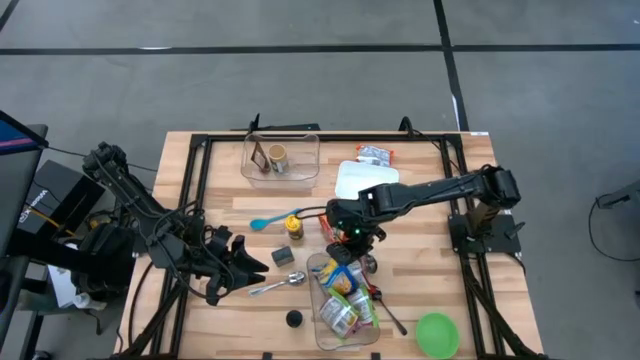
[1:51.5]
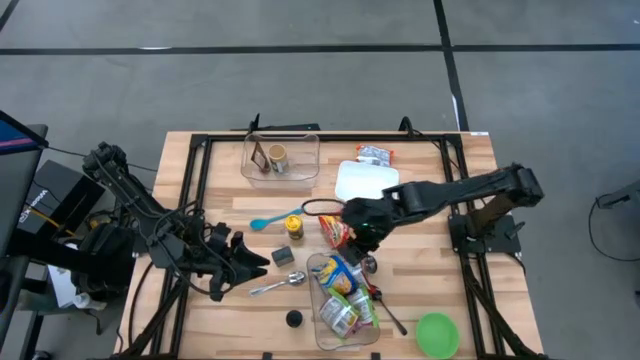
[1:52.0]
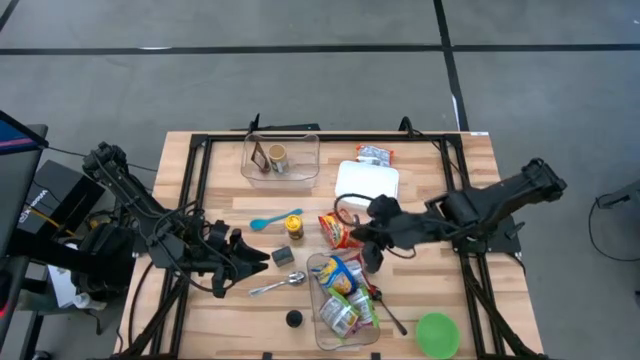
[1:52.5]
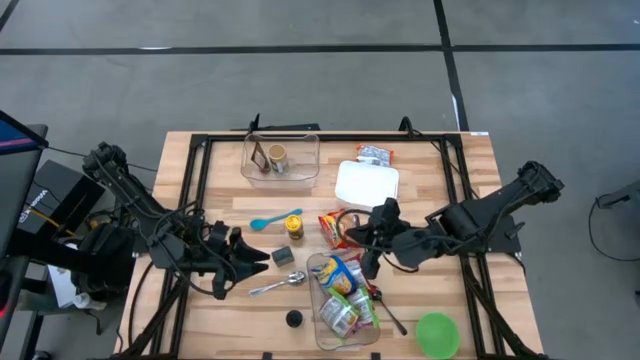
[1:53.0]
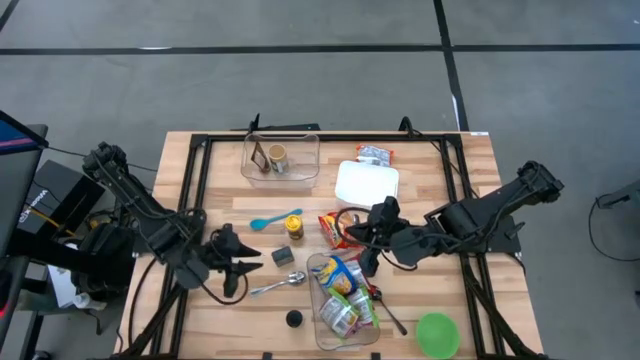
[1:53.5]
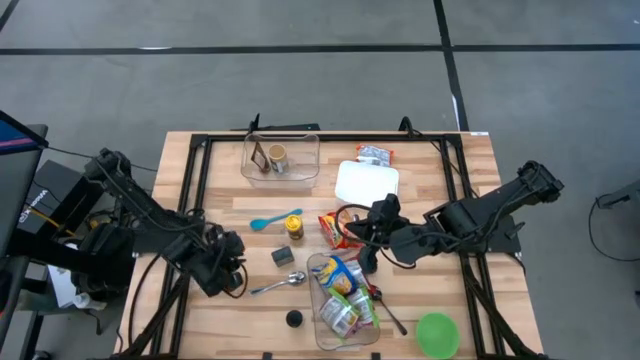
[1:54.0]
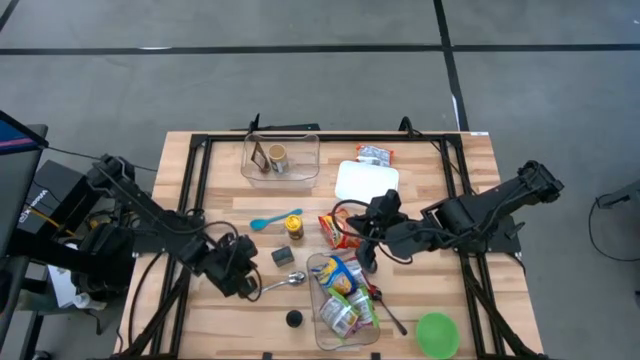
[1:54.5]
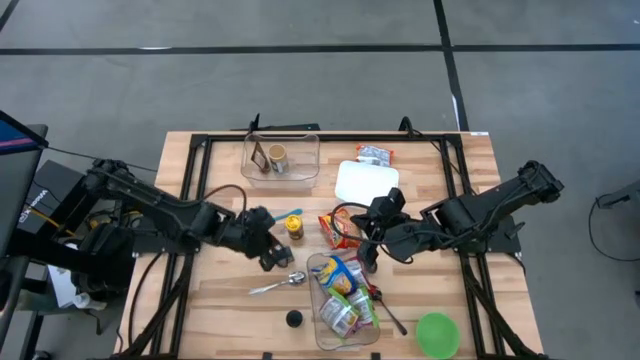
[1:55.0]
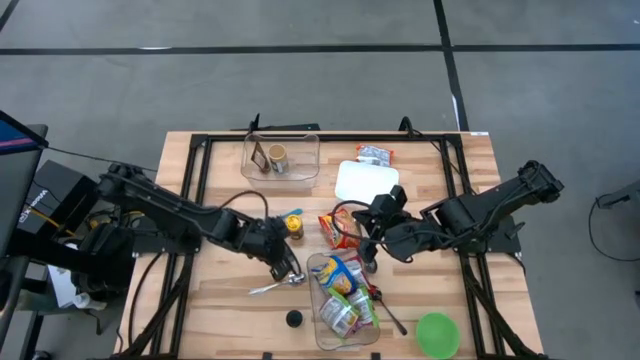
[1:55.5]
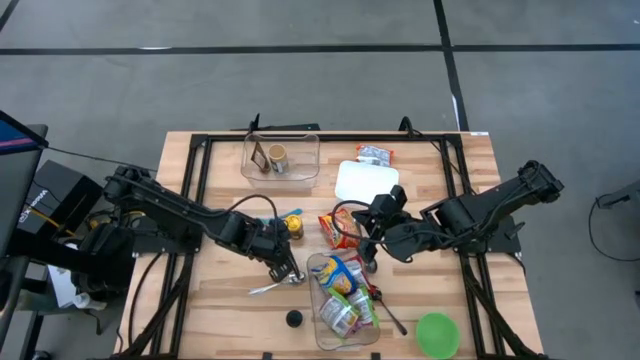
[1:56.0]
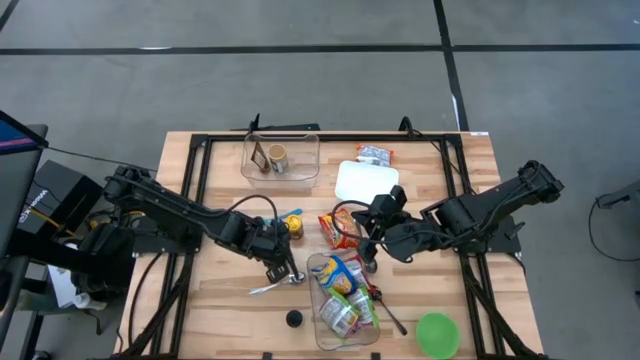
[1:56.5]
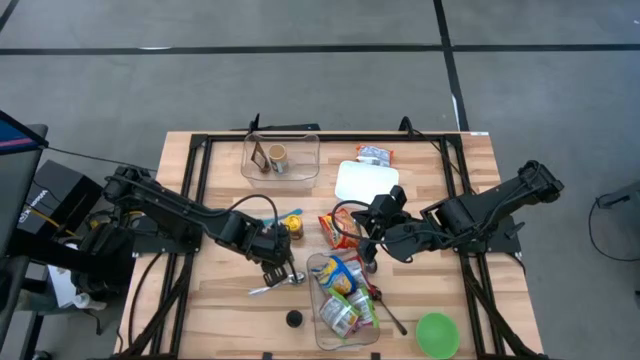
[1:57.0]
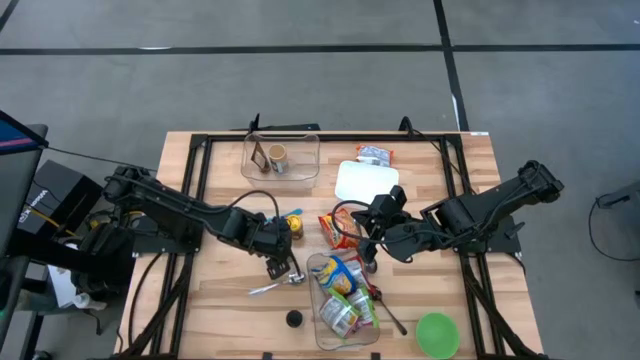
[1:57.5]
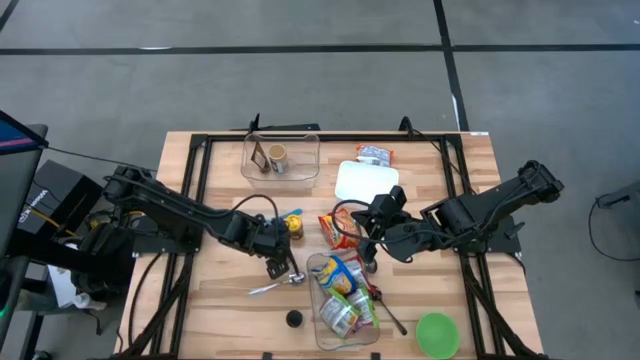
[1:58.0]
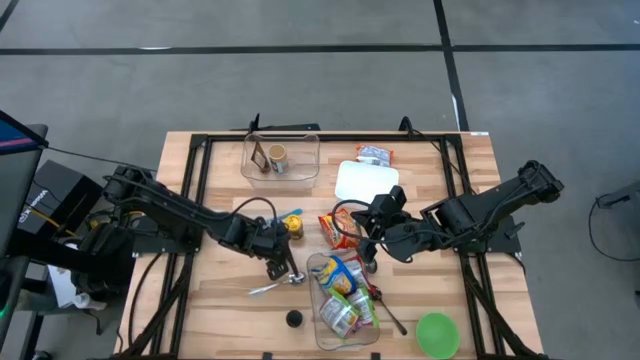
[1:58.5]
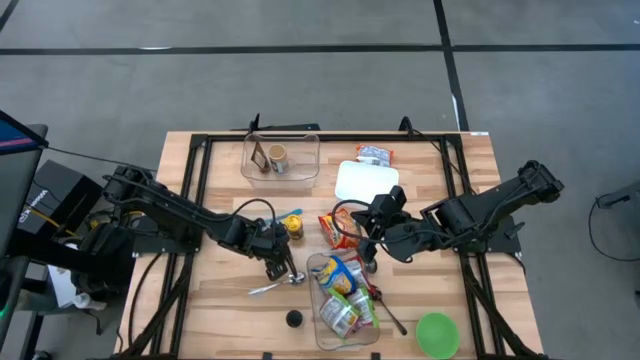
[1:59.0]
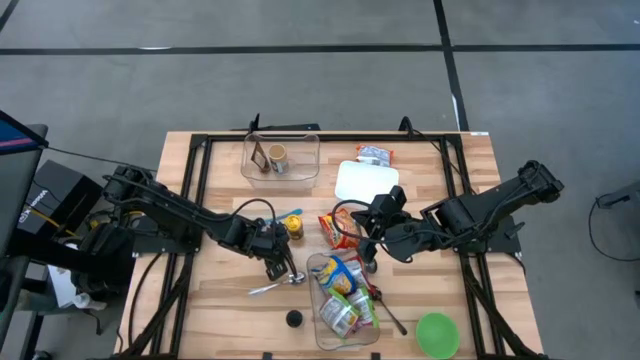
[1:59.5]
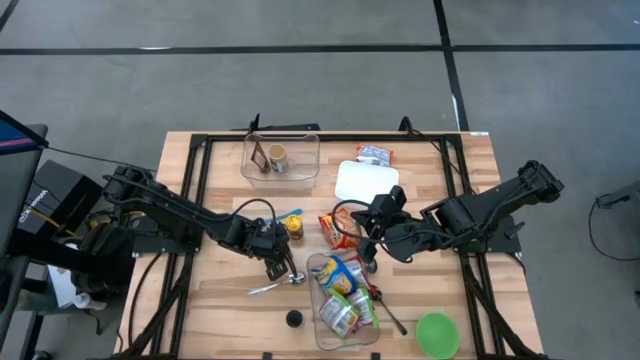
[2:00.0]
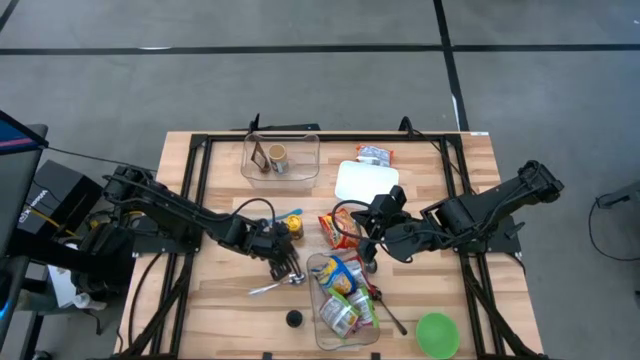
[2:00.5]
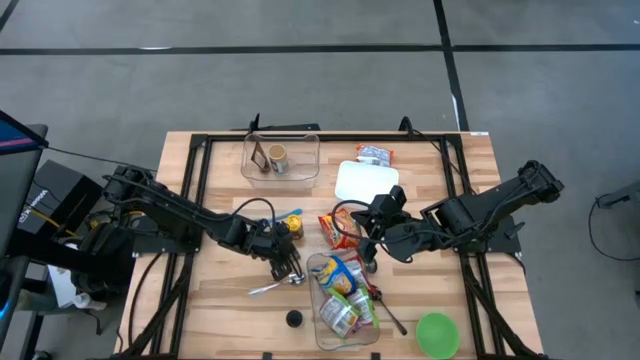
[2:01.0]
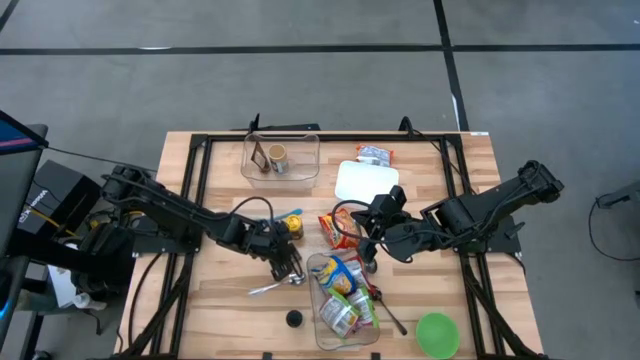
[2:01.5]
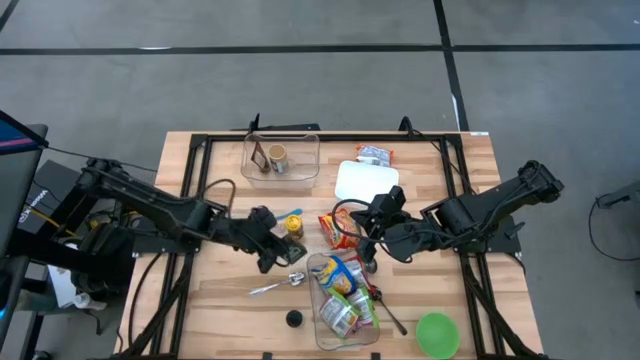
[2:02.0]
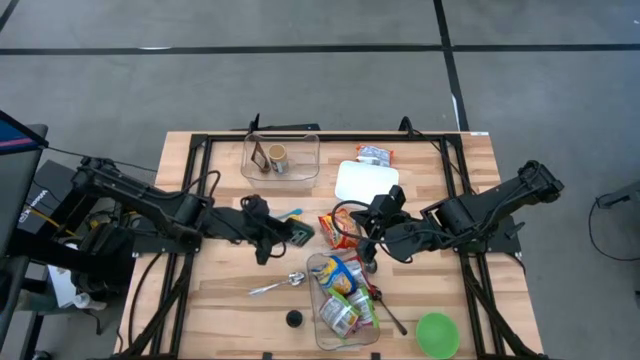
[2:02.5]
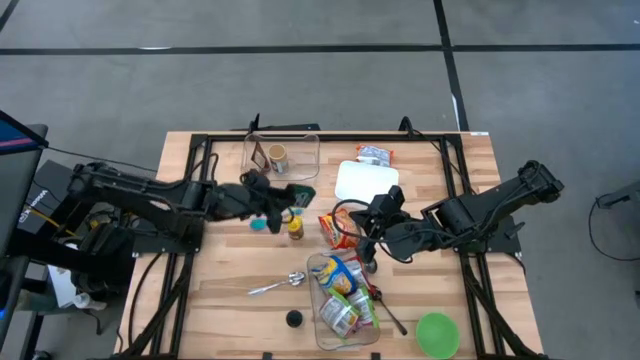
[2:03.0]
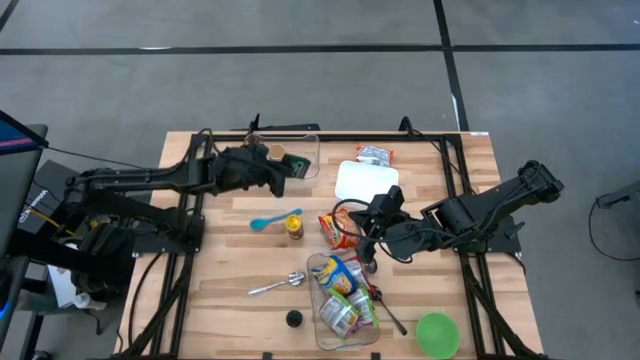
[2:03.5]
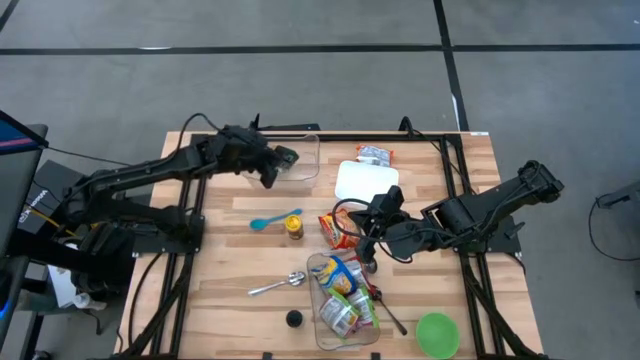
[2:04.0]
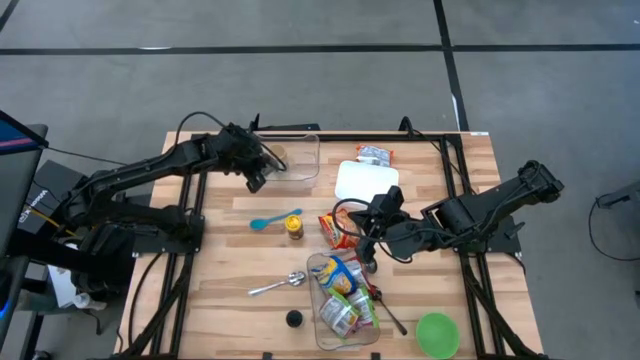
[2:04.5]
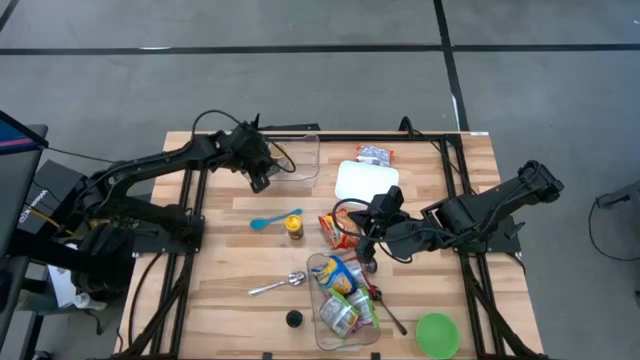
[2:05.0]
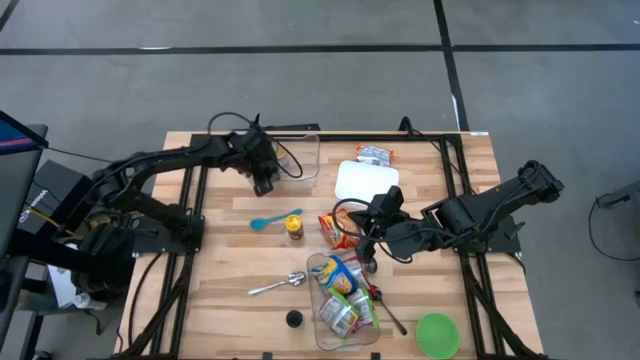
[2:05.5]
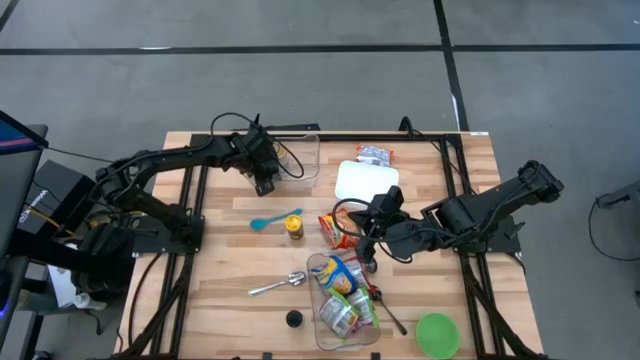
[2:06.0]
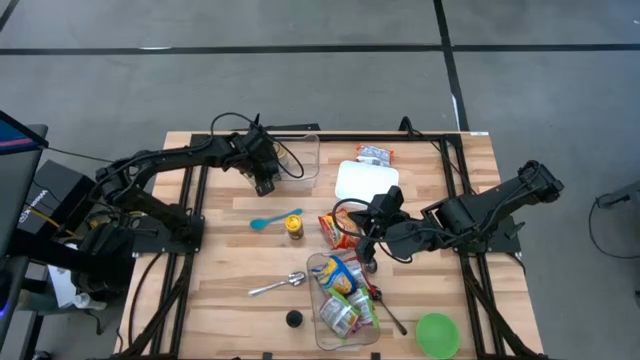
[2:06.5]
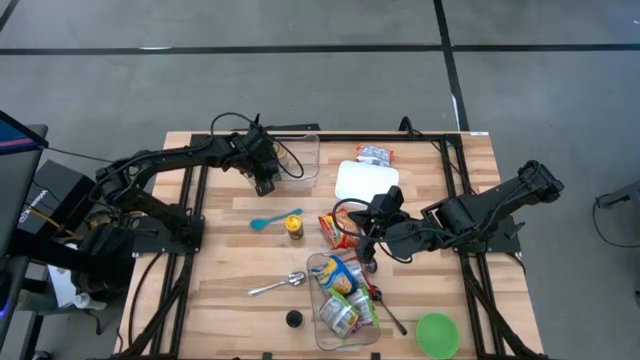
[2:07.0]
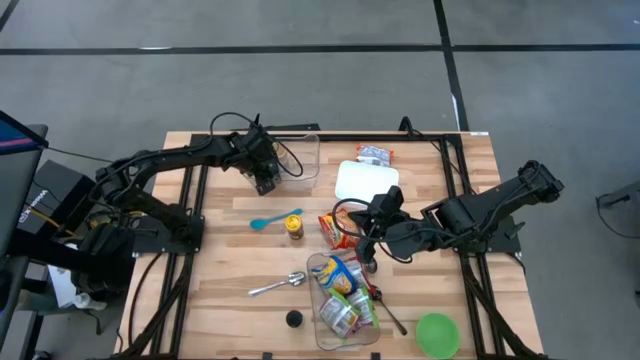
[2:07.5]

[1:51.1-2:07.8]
Task: Pick & Place Food Item
Put the green seasoning bottle into the top transparent bin

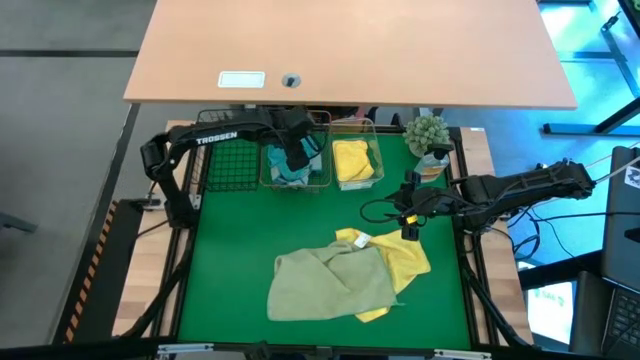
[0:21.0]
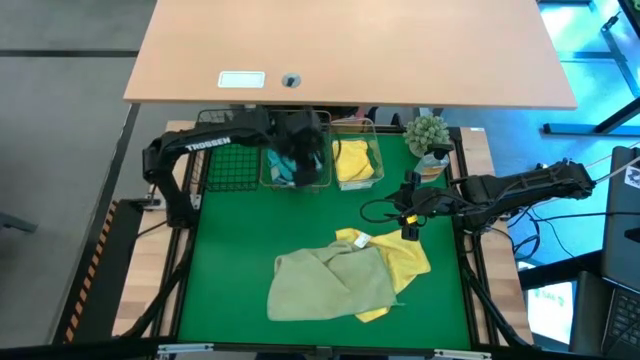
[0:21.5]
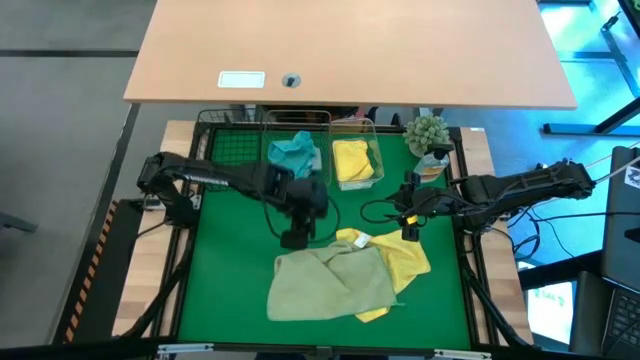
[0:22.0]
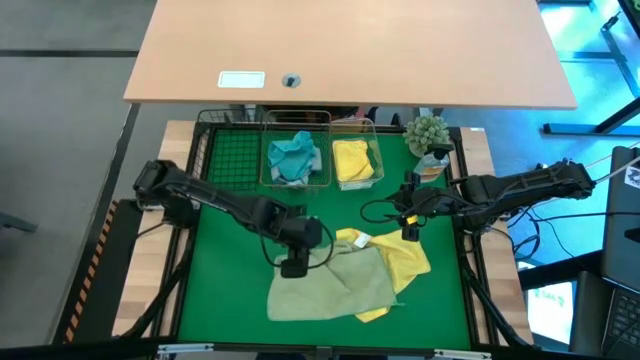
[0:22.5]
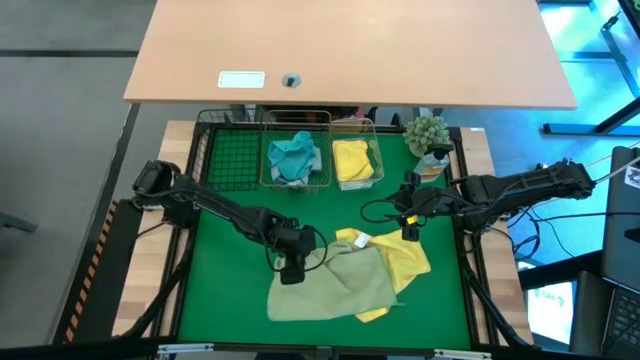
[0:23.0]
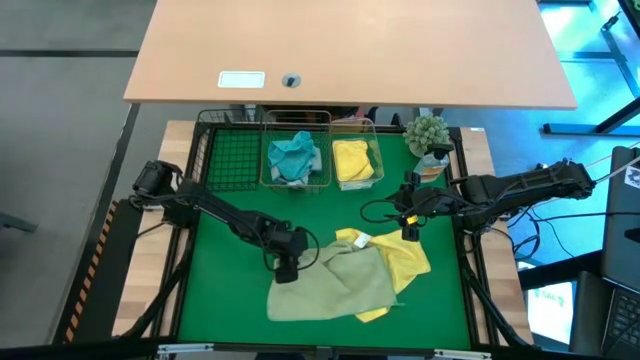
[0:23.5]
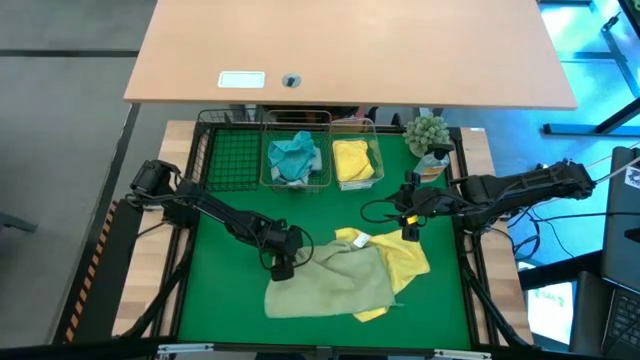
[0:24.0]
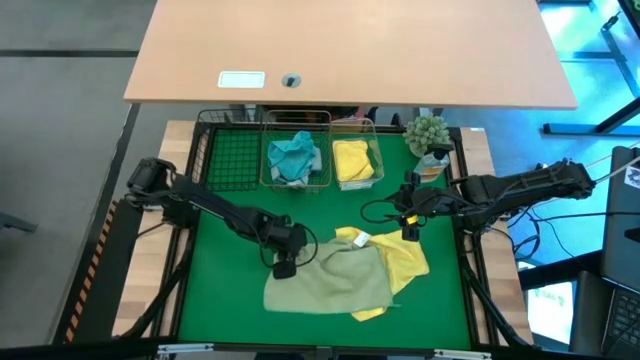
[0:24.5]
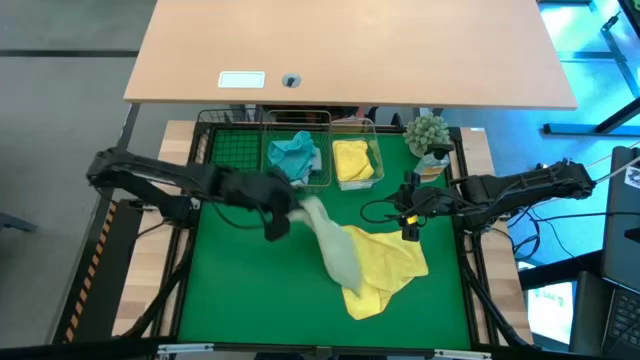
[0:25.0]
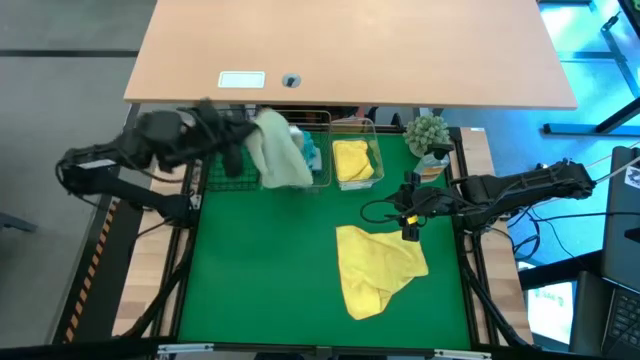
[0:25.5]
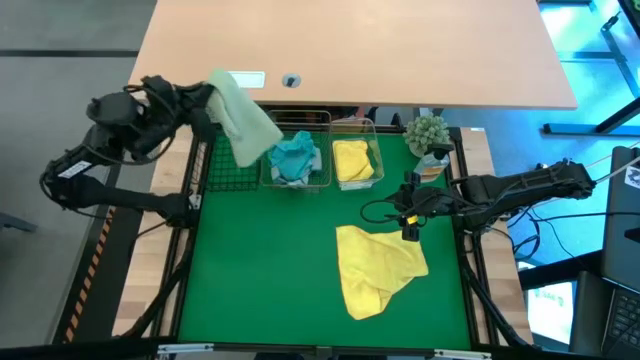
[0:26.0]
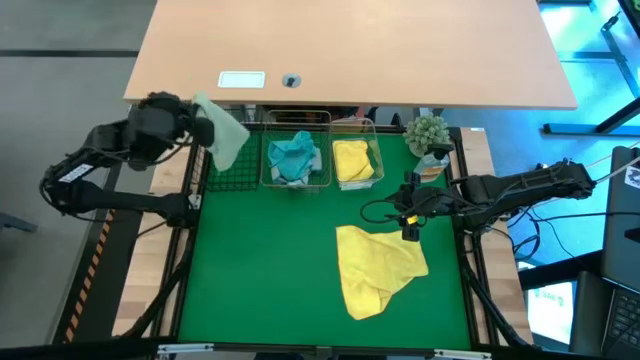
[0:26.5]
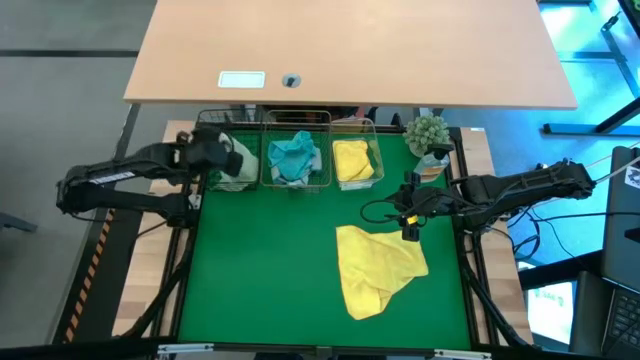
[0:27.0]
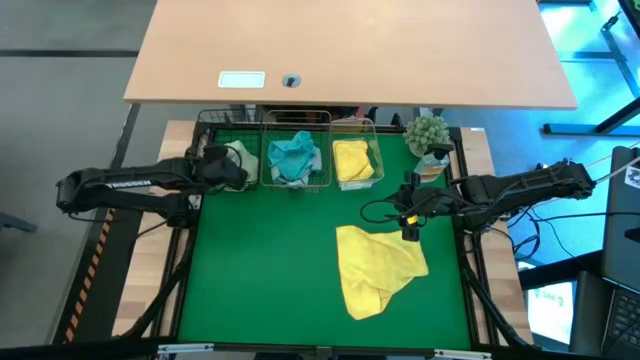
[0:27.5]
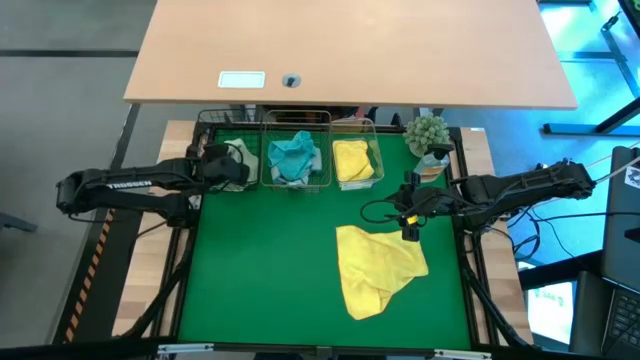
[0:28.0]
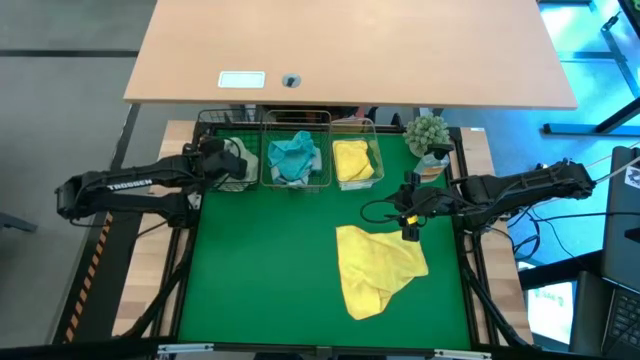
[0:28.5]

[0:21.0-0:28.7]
Task: Sort microfiber towel by color & place in baskets
Put the green microfiber towel into the black wire basket
